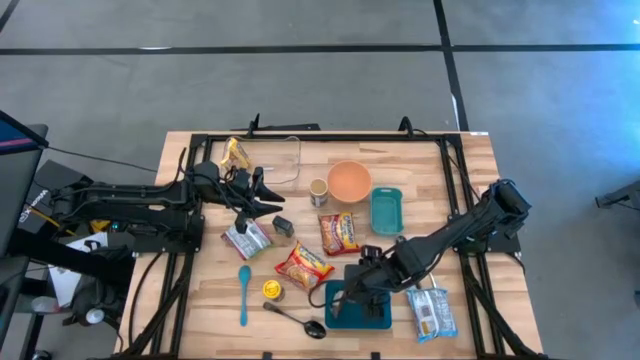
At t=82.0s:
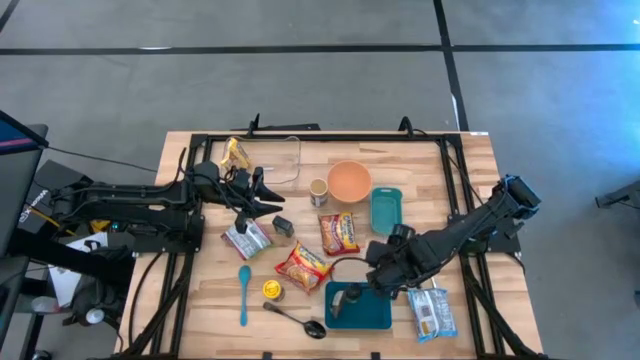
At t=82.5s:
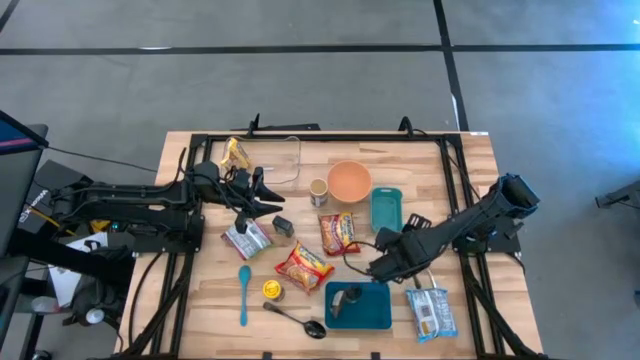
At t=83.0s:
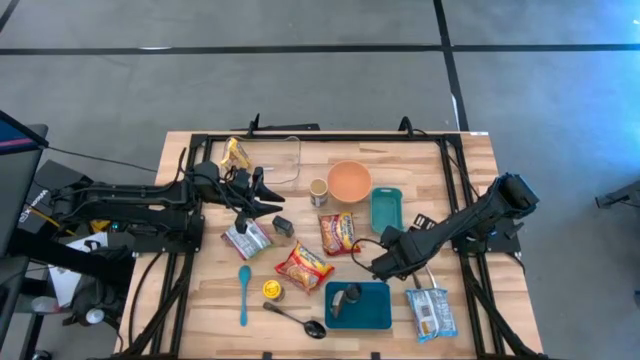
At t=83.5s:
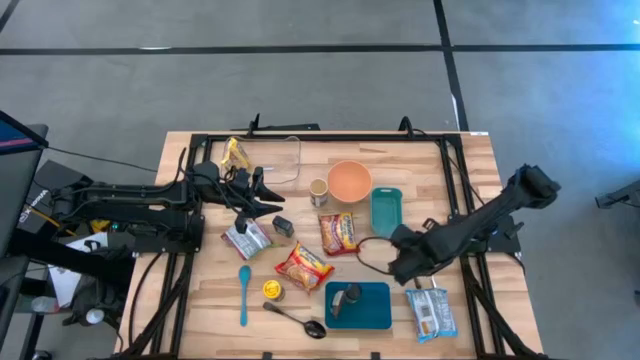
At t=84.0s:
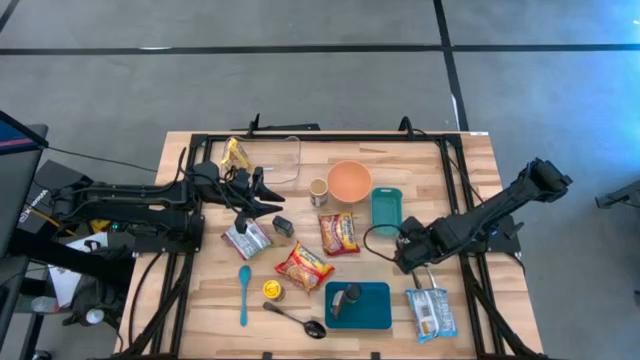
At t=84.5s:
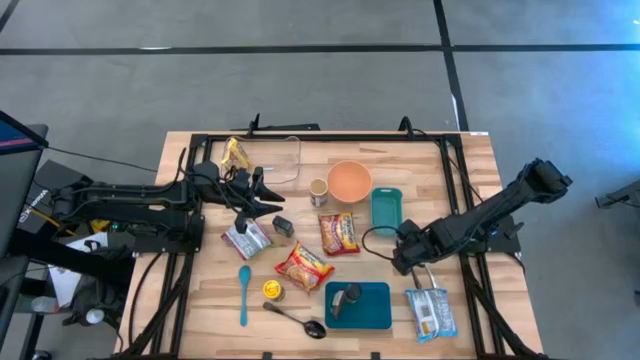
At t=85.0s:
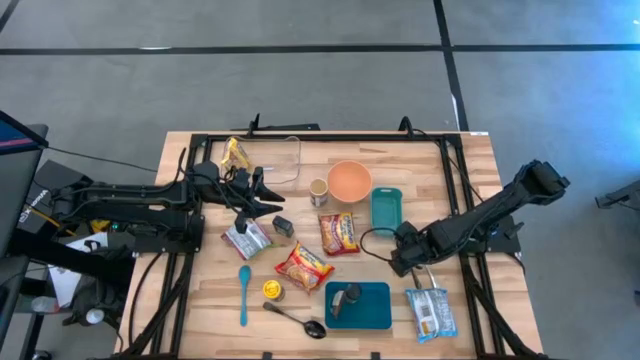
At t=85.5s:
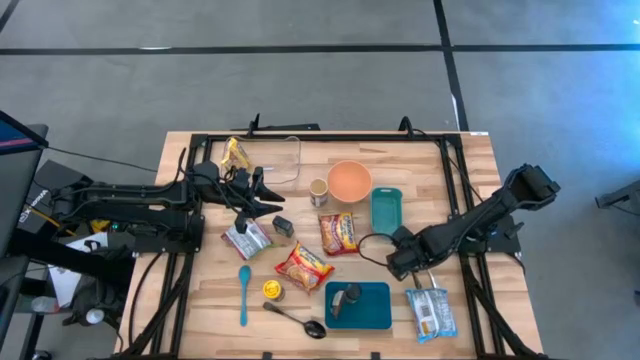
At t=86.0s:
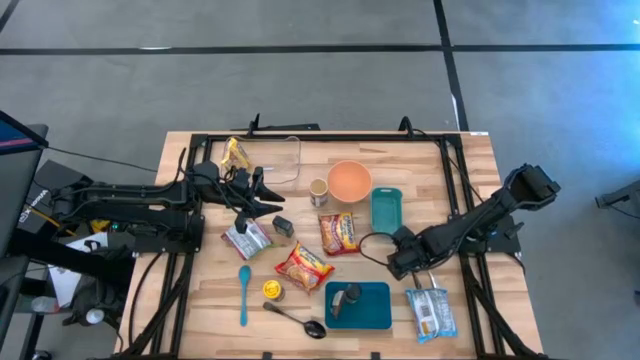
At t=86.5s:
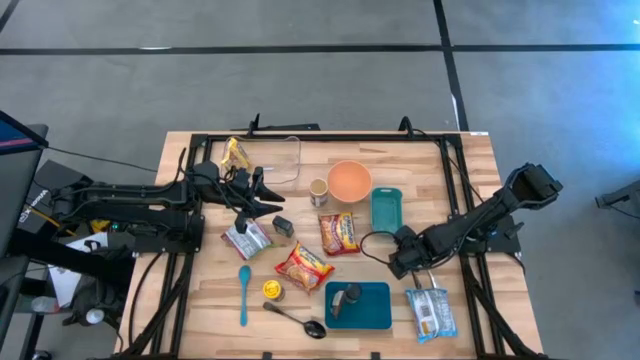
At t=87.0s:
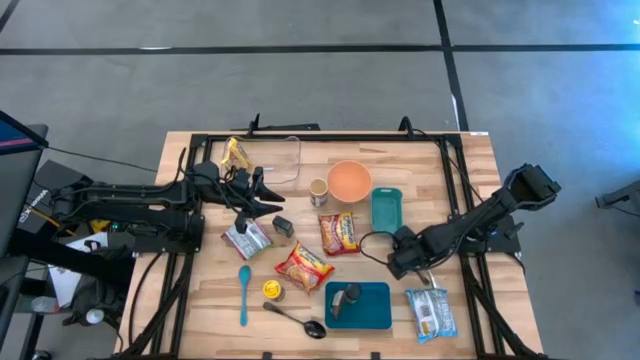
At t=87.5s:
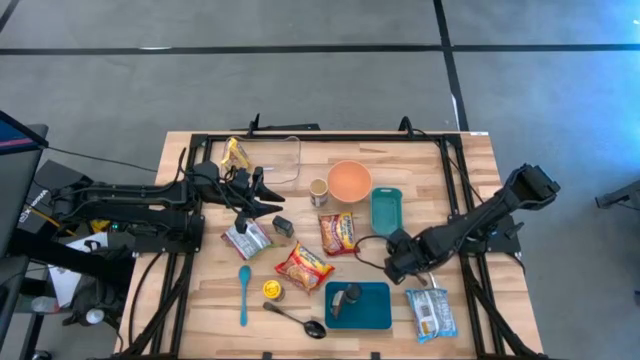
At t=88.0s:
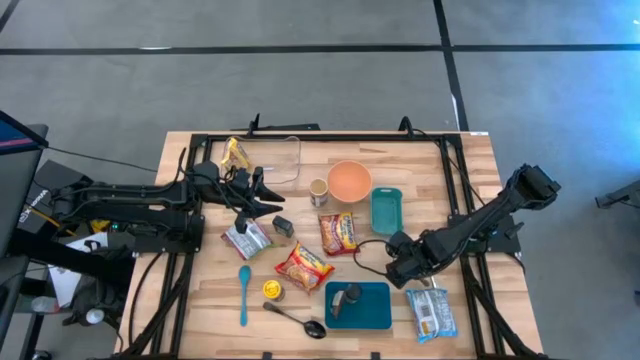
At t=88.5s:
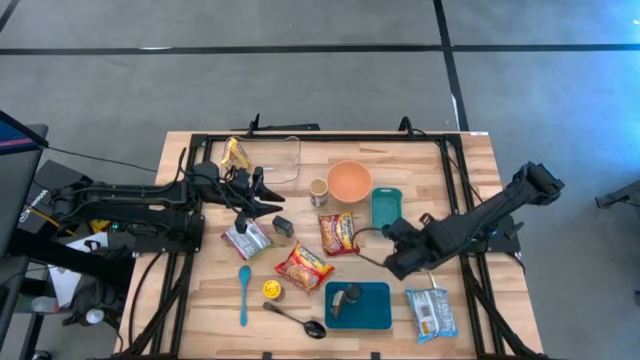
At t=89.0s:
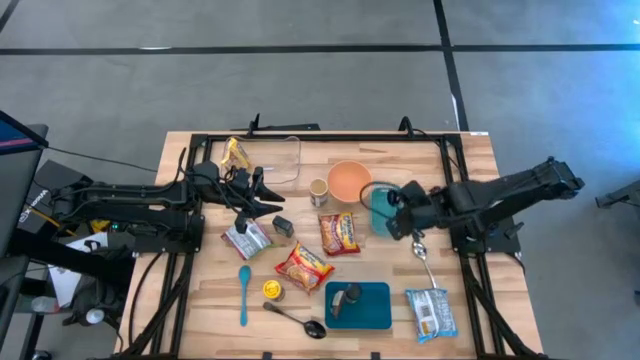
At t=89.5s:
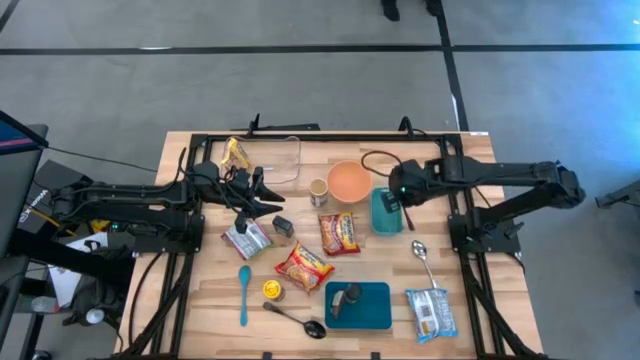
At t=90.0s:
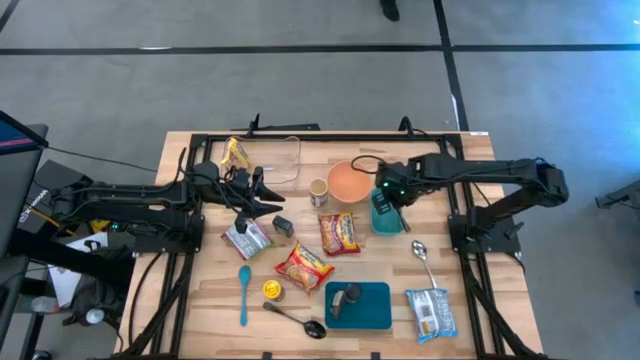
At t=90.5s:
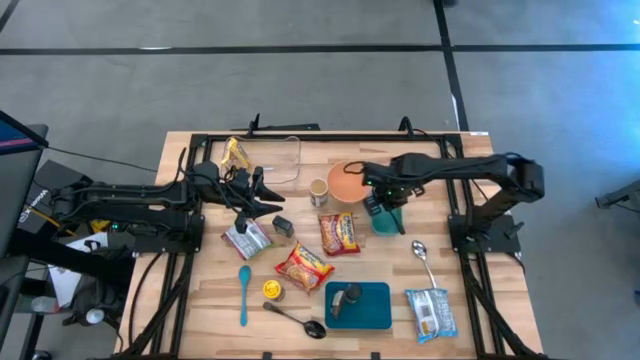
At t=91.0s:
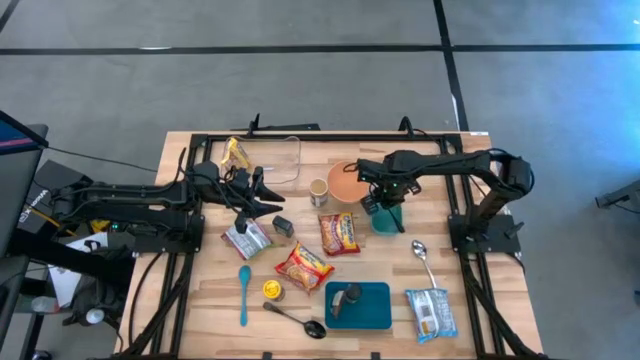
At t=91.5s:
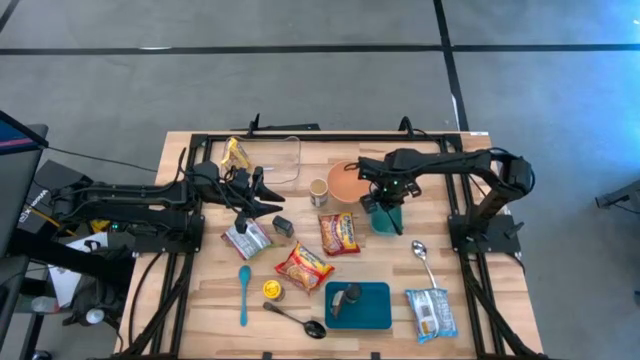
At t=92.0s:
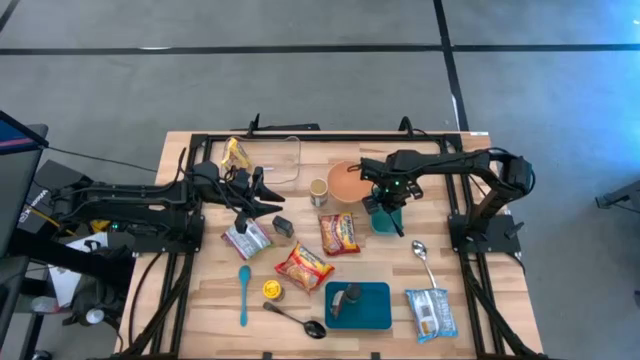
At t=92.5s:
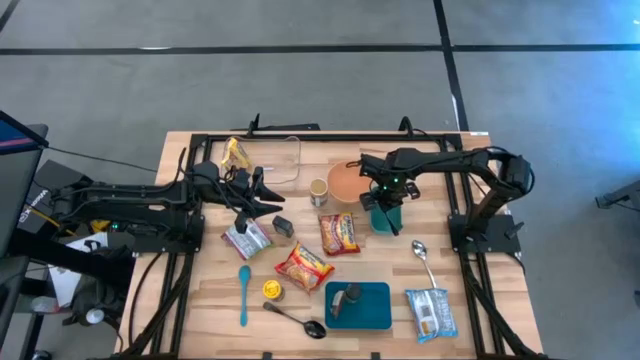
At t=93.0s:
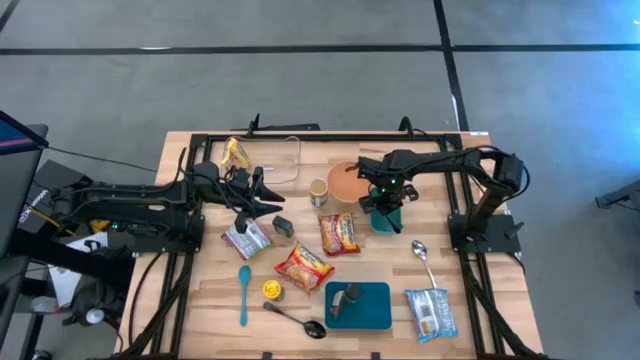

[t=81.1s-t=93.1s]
Task: Pick & Place Food Item
Put the top black spoon into the green bin

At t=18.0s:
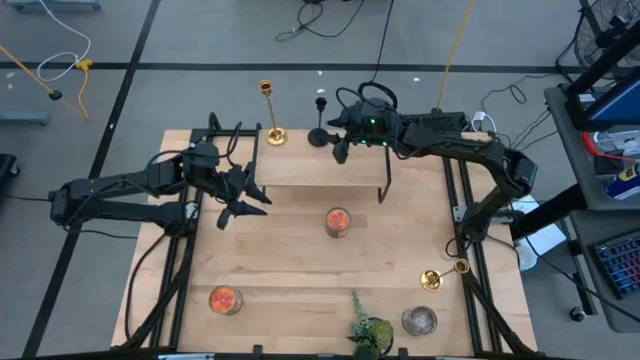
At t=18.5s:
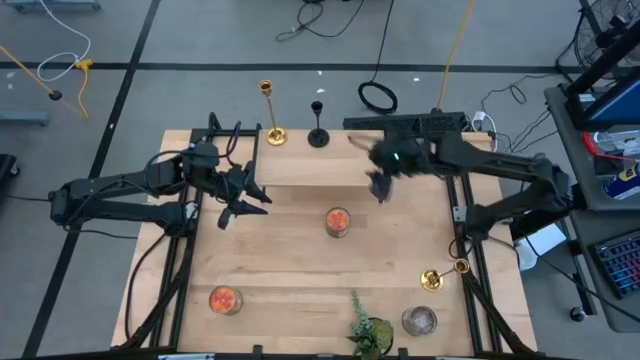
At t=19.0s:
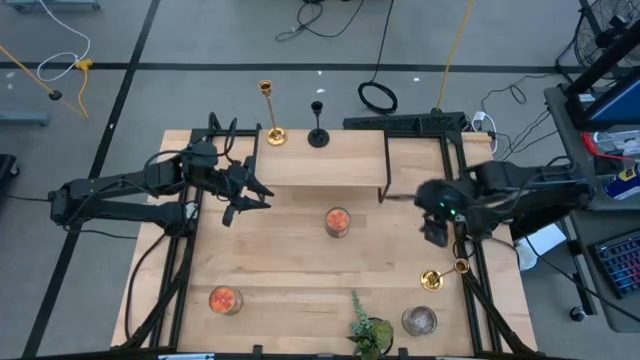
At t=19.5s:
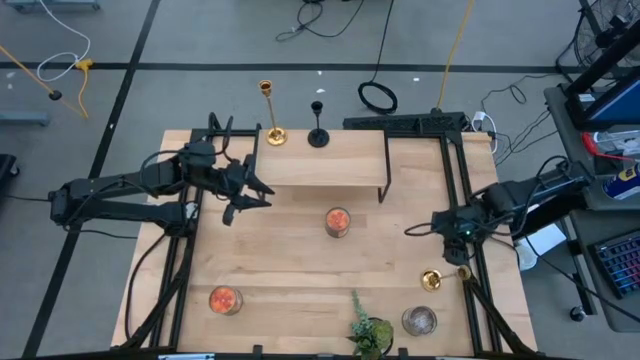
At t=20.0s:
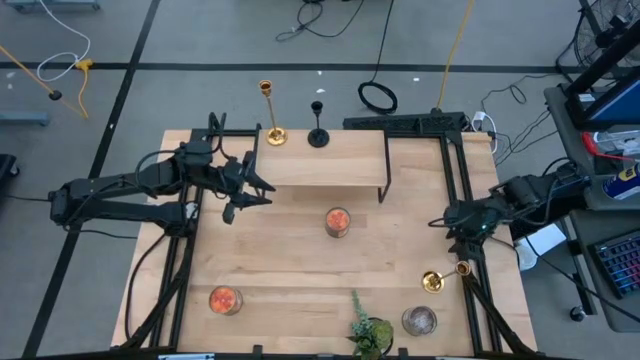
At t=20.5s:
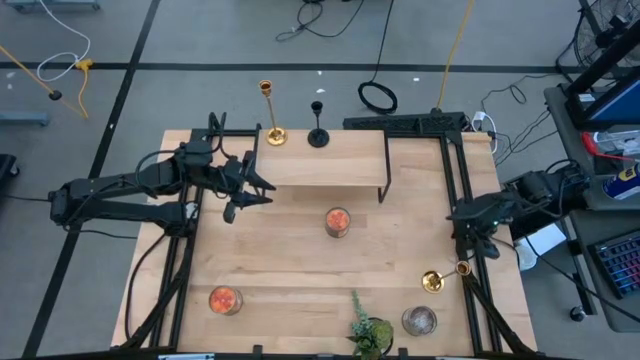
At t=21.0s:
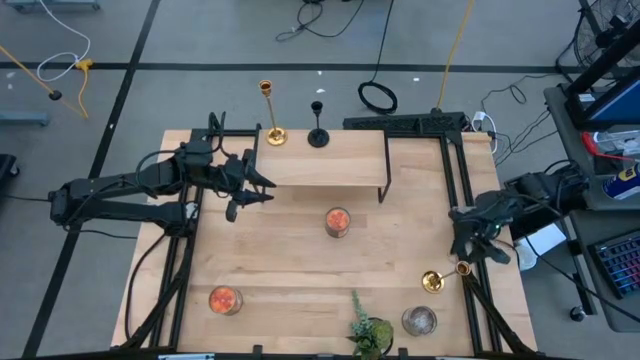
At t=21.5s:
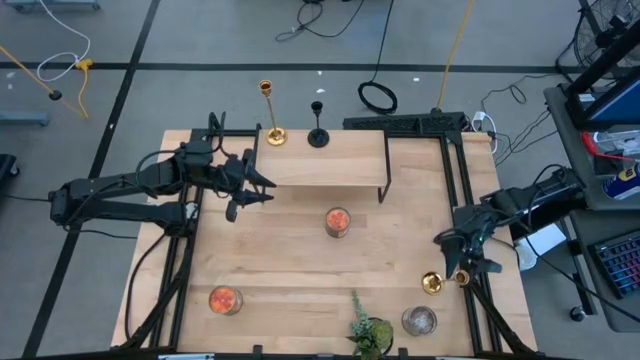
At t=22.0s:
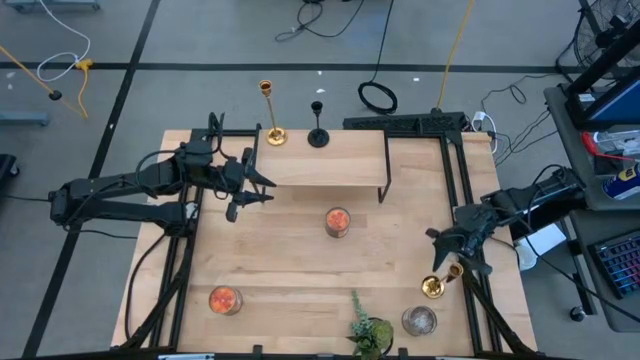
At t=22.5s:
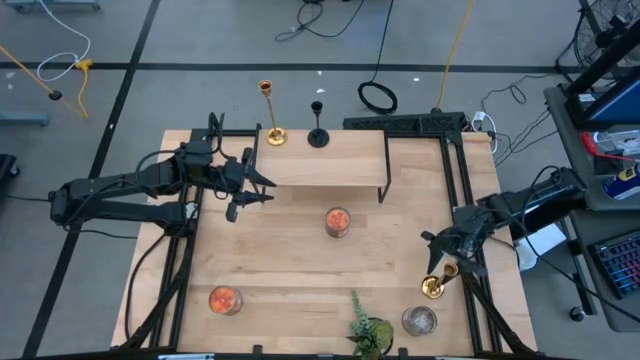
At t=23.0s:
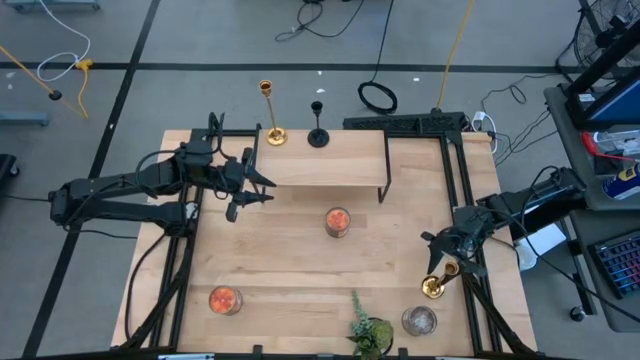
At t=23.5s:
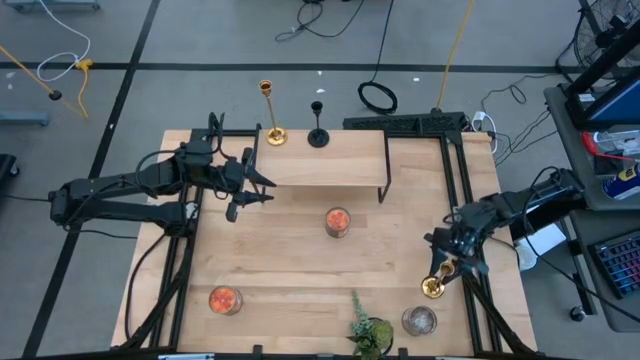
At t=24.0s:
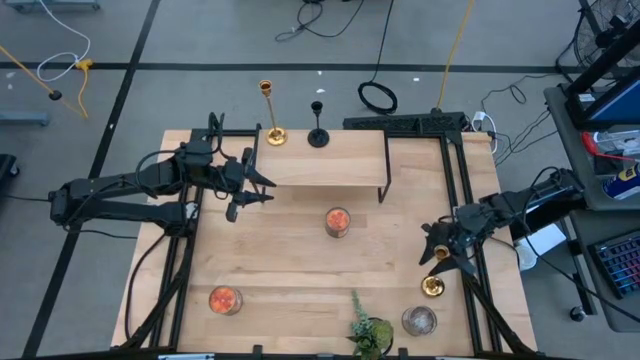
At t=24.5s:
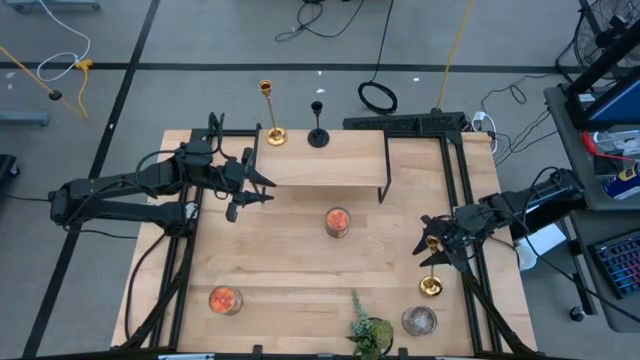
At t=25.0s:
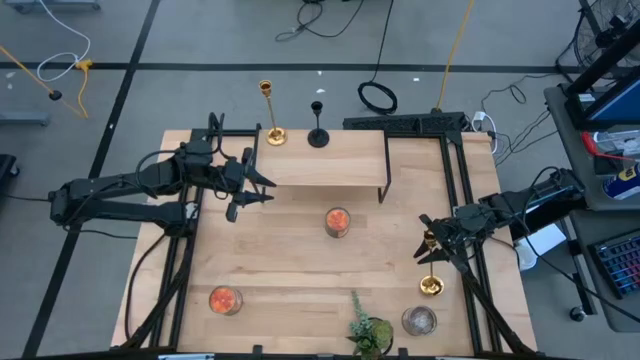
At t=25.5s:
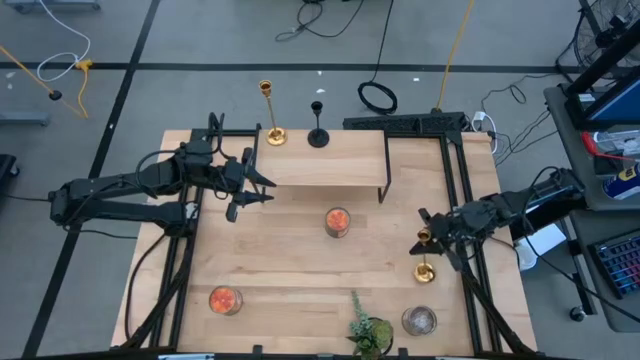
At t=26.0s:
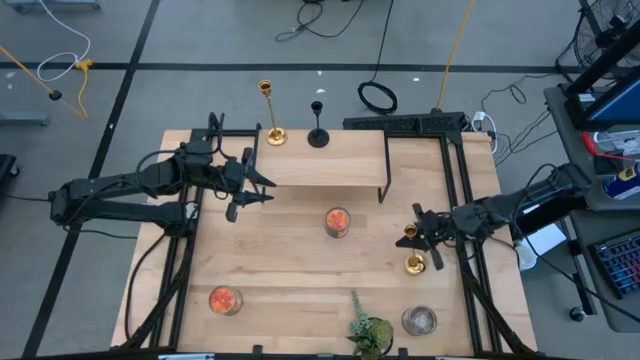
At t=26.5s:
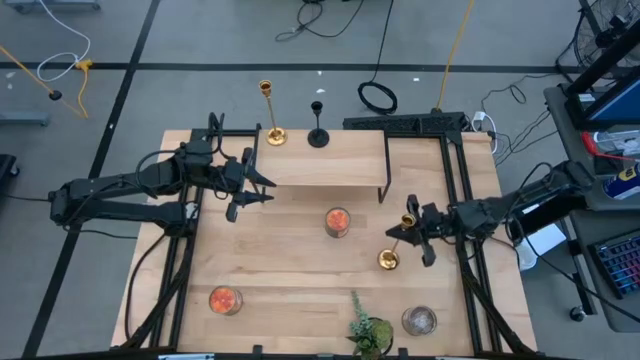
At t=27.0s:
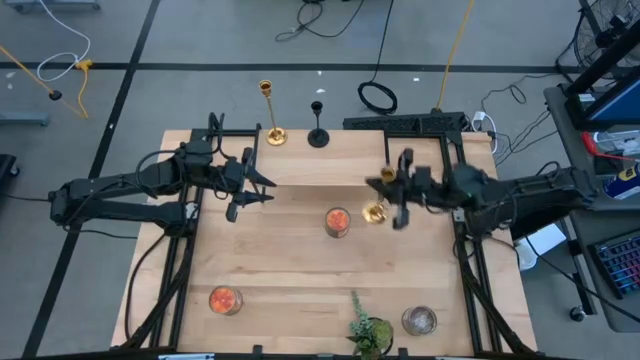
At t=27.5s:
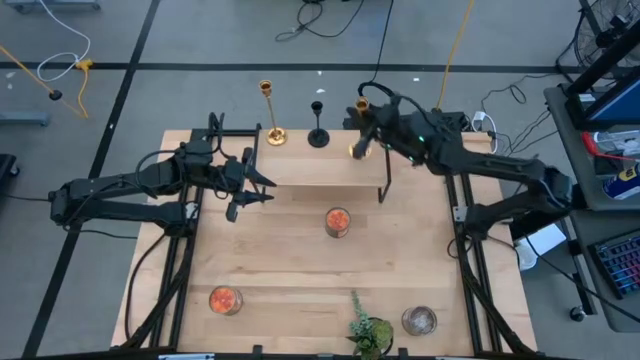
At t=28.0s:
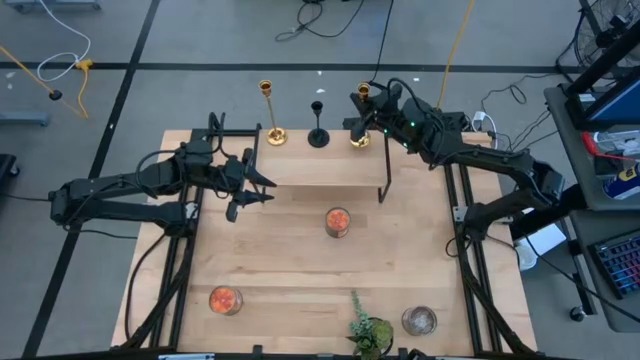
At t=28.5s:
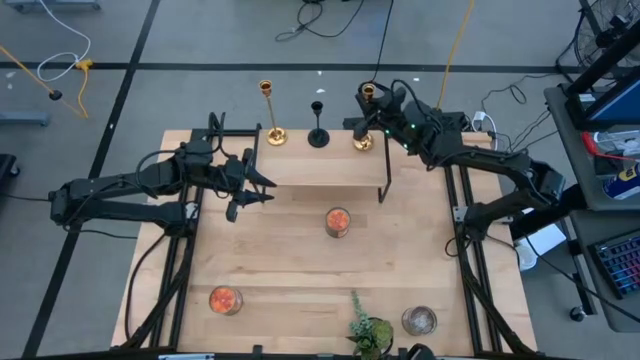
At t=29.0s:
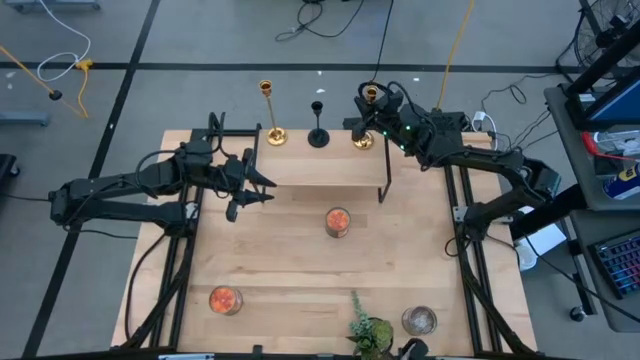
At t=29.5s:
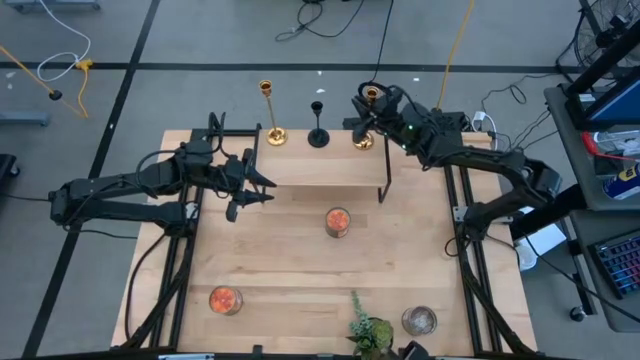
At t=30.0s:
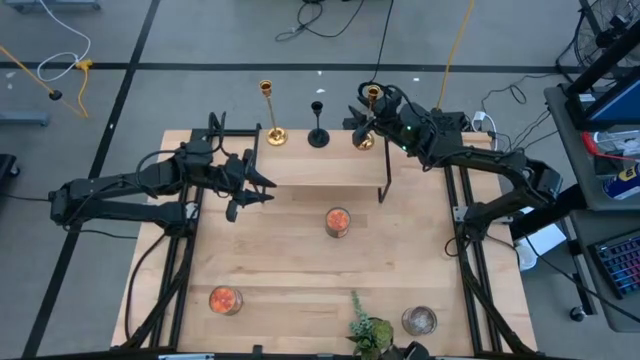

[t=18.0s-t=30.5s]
Task: Pick & Place candle stick holders
Put the gold candle holder on the shelf aligned with the other gold and black candle holders
